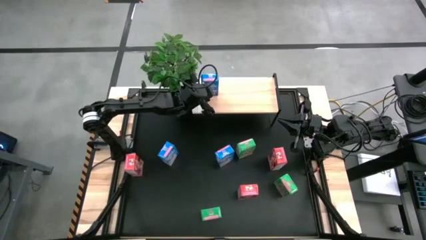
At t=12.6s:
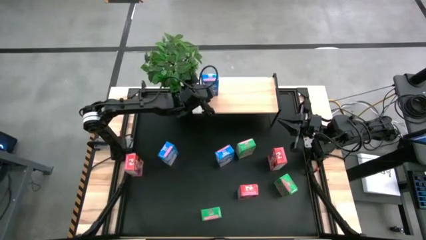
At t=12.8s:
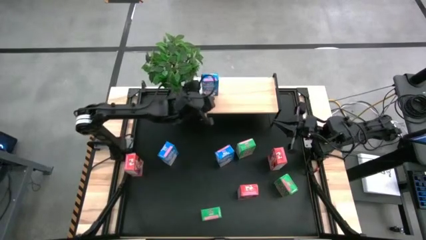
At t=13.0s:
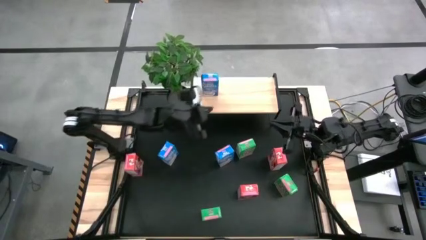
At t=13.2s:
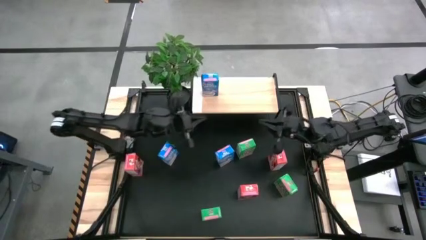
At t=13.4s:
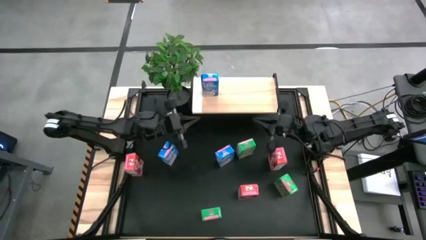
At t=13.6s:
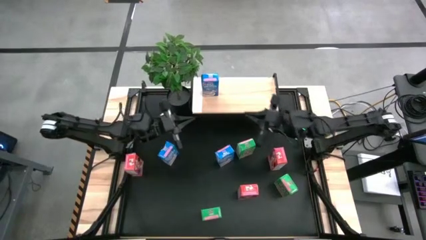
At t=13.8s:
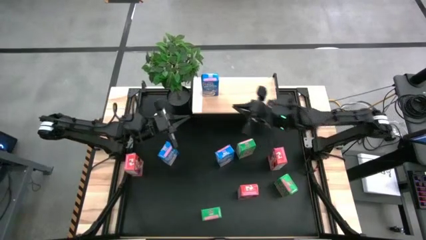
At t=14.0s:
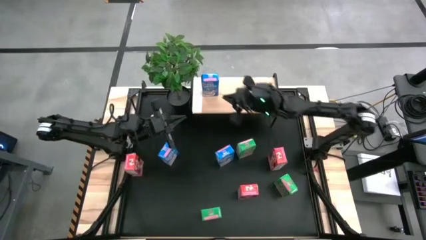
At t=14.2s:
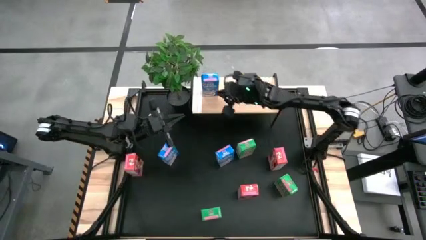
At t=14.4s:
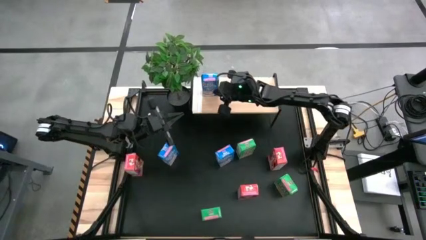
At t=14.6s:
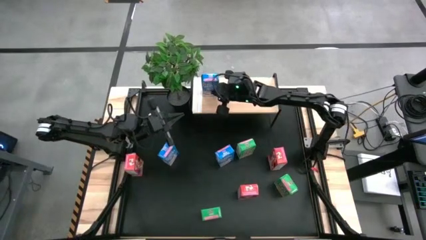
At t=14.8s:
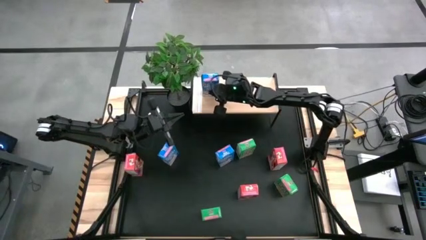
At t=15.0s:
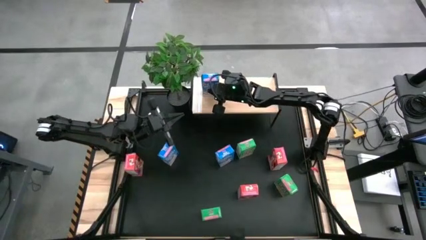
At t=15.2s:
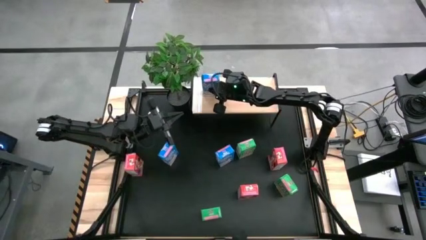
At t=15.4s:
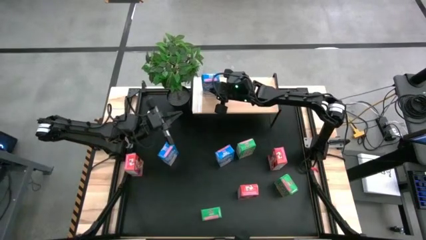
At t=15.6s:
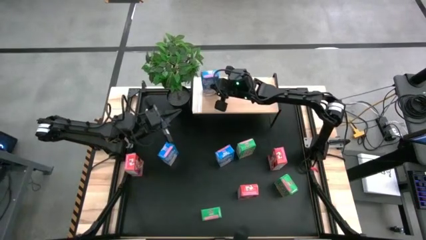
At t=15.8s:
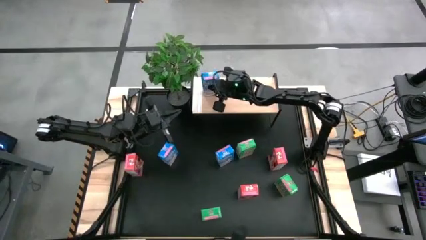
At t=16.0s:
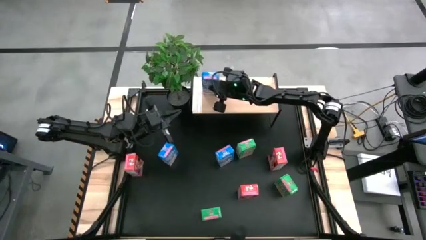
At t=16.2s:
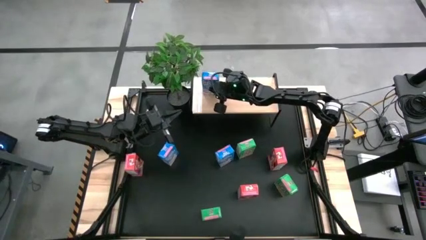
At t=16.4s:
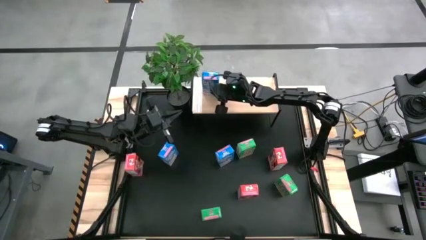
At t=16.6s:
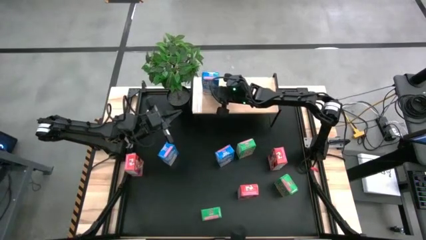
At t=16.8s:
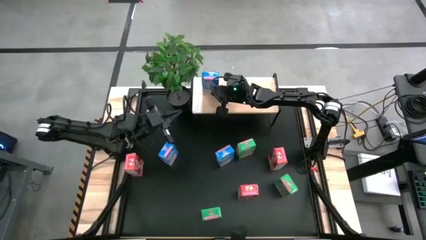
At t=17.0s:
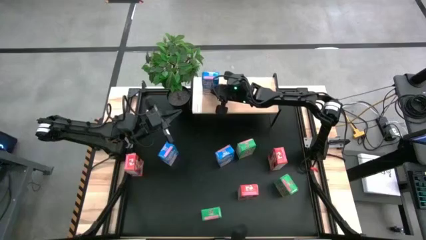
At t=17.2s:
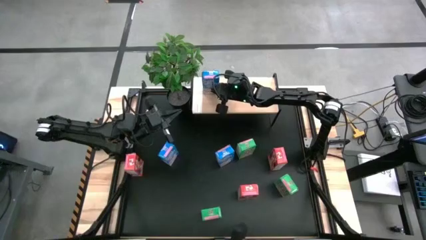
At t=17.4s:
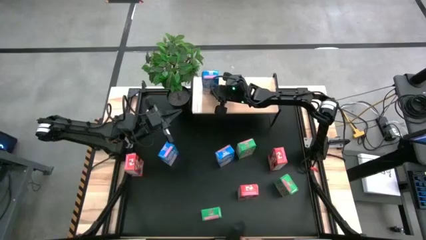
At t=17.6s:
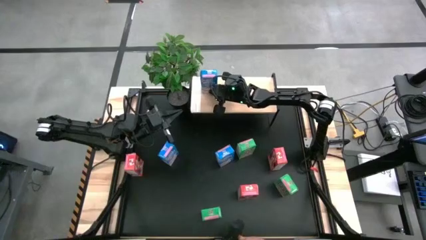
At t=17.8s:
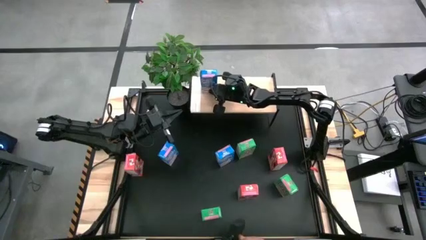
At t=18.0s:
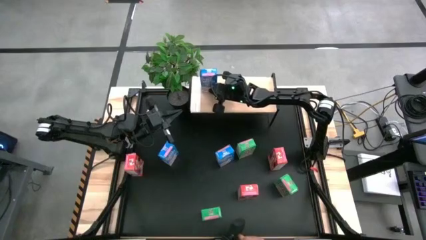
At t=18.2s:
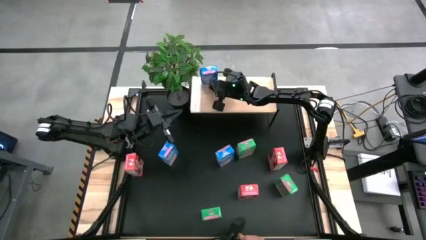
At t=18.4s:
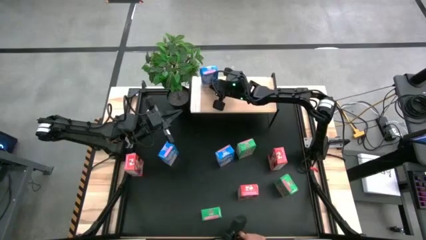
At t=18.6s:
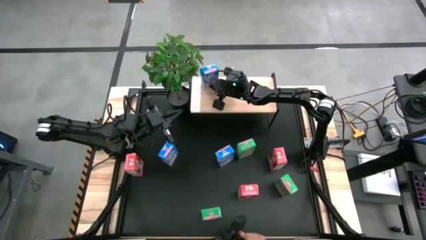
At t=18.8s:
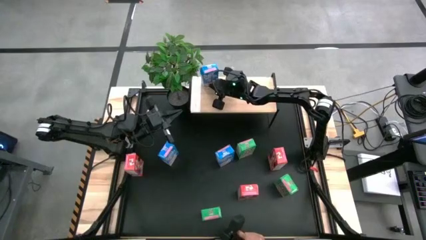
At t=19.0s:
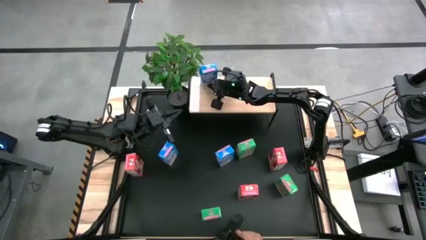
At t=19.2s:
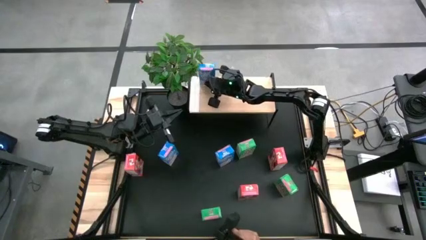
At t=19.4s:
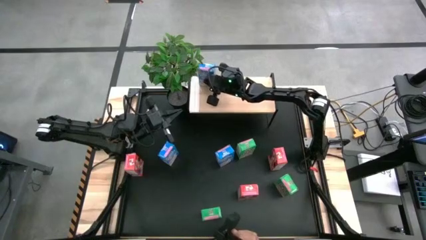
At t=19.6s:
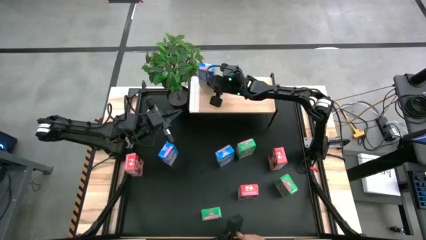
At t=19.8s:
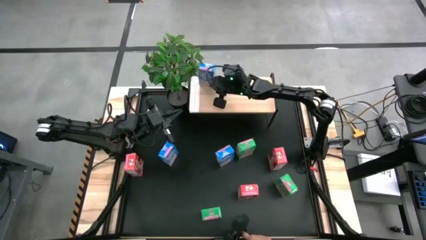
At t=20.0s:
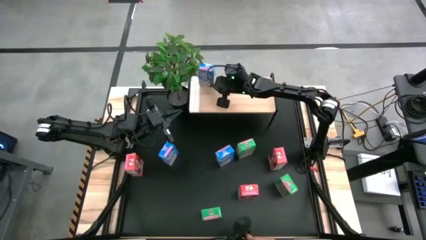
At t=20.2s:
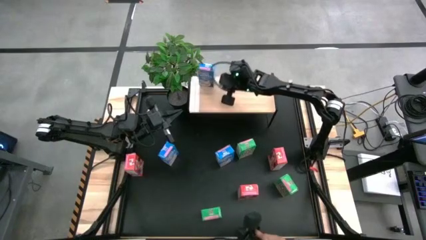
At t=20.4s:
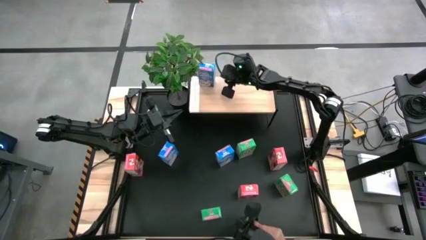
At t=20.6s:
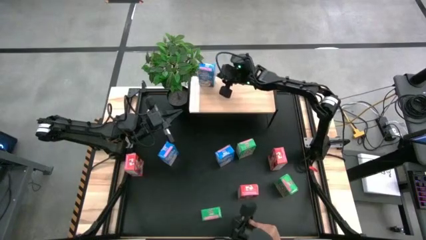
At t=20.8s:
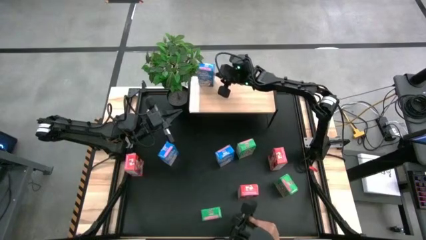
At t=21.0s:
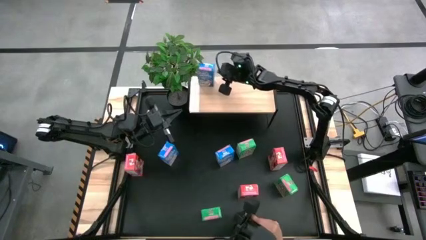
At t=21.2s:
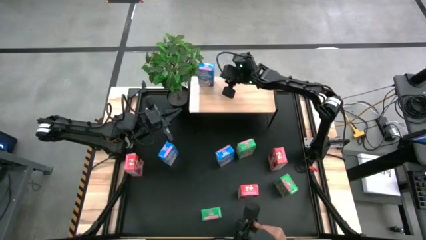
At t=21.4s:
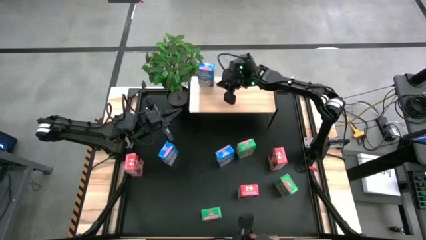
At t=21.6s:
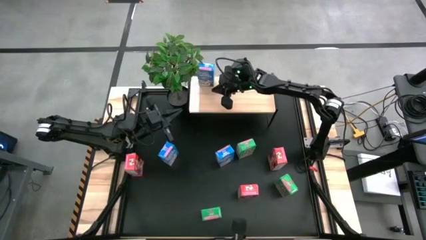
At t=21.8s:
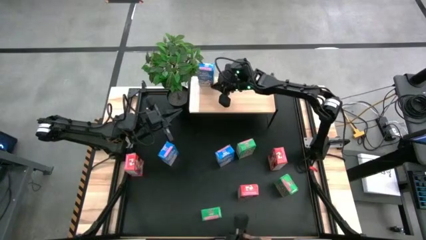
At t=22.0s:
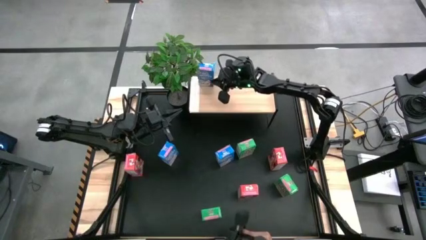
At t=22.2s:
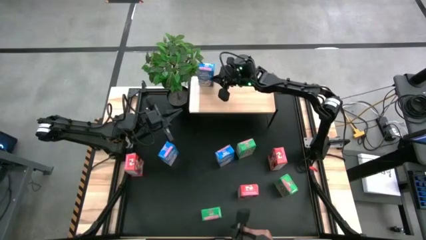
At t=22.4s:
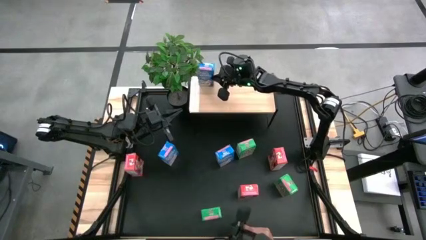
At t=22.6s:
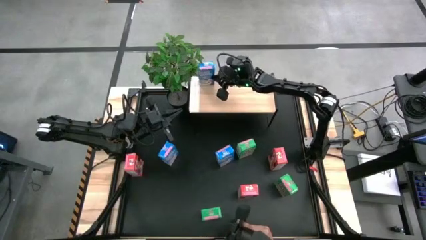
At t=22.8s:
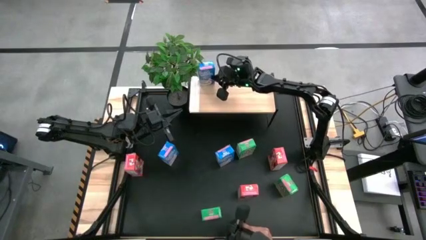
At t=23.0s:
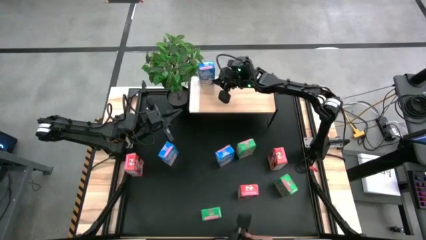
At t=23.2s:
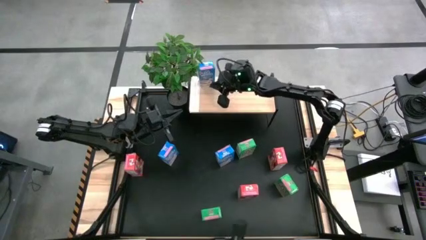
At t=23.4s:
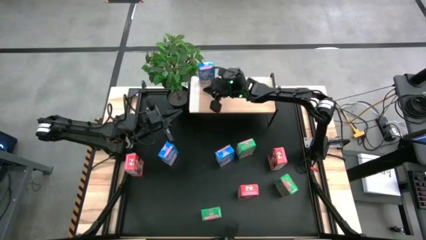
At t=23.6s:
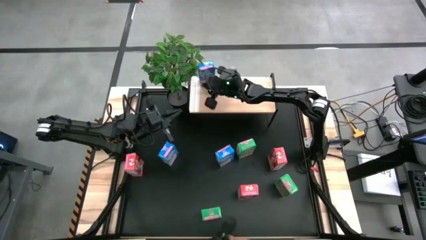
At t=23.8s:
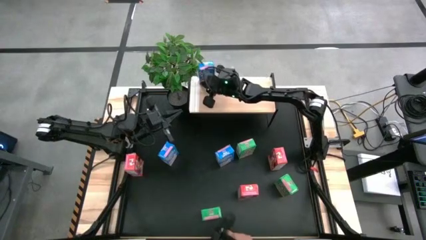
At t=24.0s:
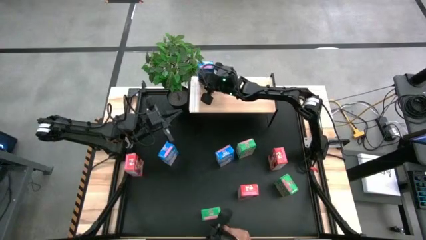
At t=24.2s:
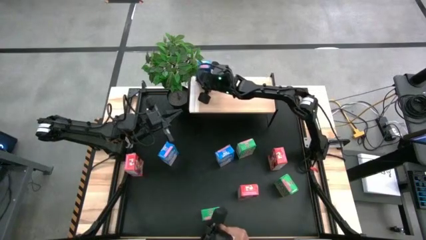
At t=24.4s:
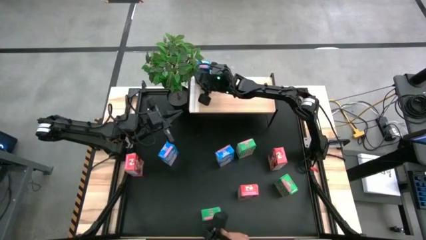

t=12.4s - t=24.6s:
Task: Stack cereal on shelf
Put the bottom left blue cereal box on the shelf

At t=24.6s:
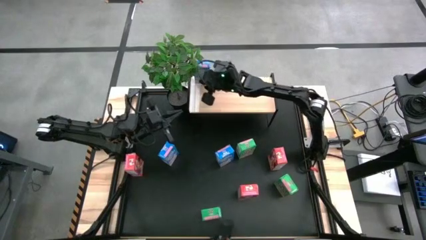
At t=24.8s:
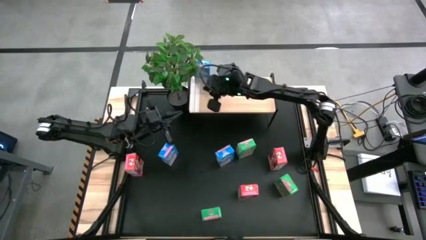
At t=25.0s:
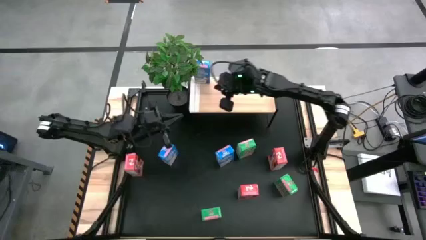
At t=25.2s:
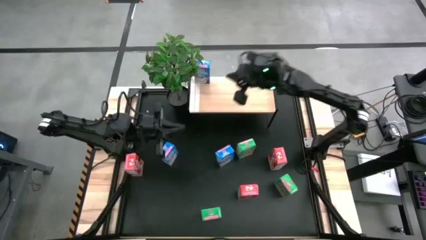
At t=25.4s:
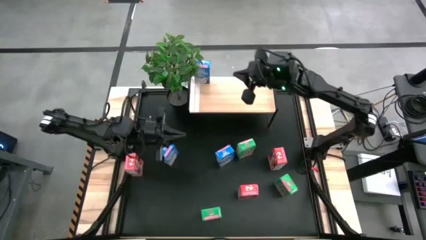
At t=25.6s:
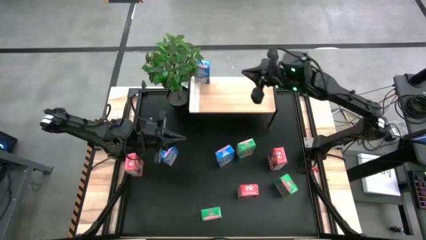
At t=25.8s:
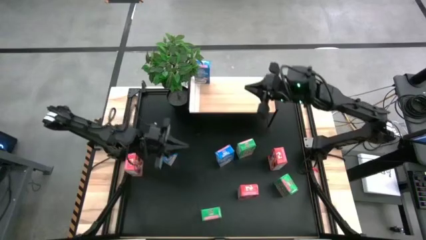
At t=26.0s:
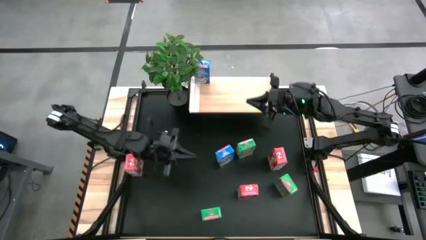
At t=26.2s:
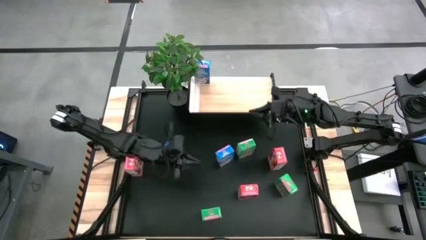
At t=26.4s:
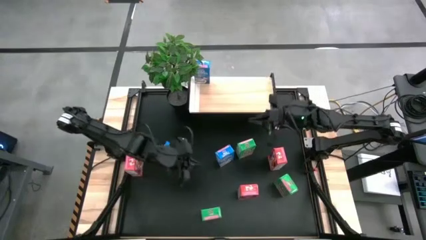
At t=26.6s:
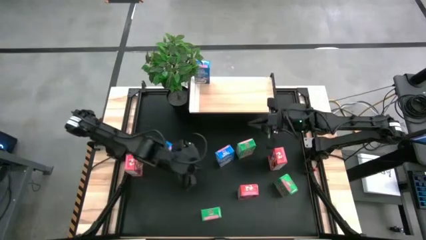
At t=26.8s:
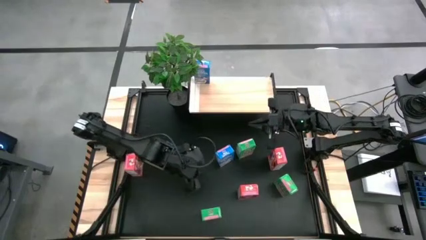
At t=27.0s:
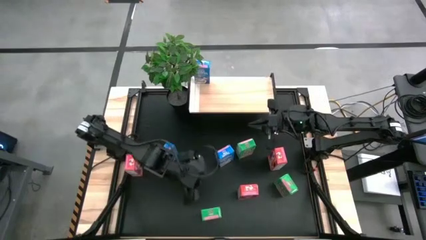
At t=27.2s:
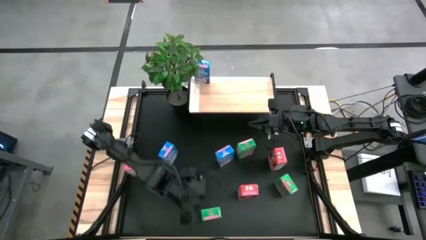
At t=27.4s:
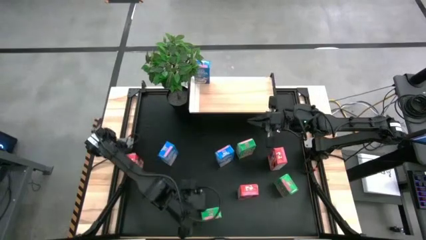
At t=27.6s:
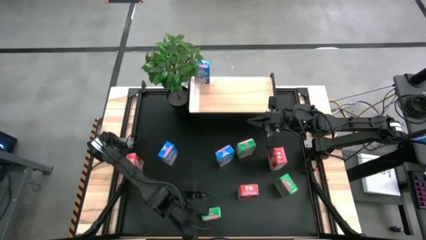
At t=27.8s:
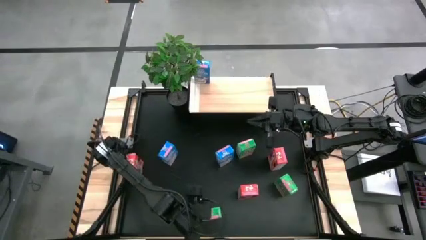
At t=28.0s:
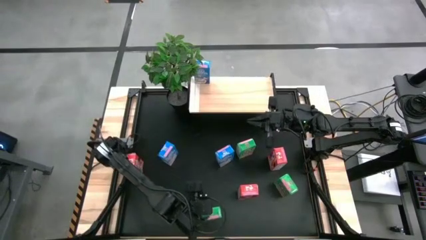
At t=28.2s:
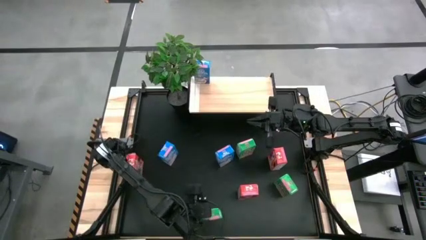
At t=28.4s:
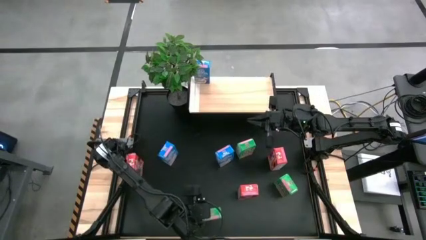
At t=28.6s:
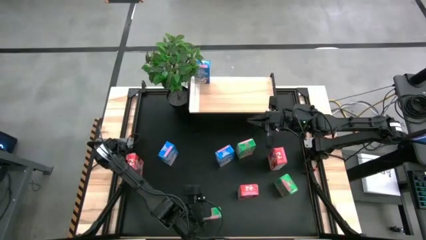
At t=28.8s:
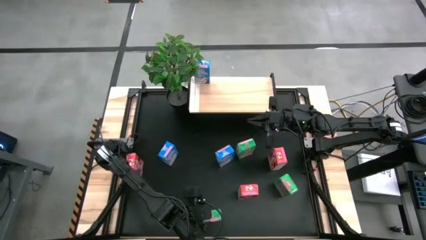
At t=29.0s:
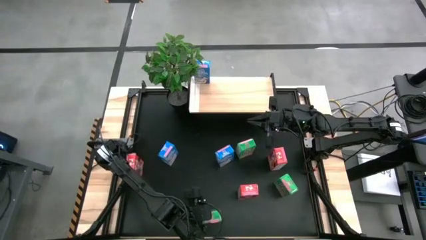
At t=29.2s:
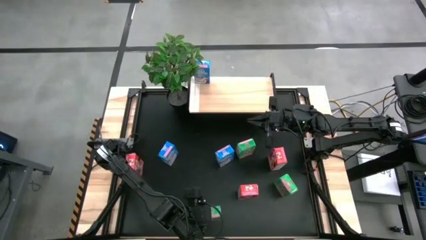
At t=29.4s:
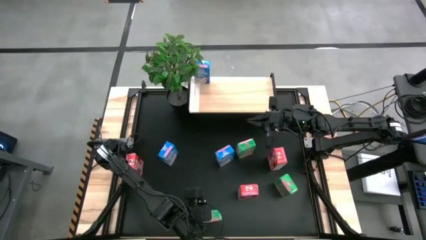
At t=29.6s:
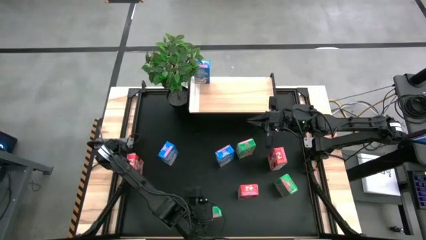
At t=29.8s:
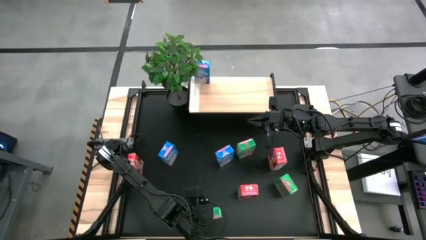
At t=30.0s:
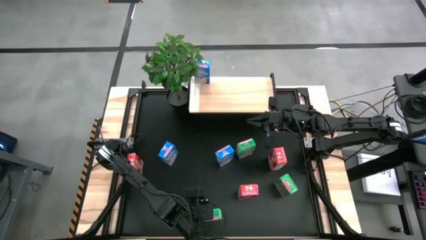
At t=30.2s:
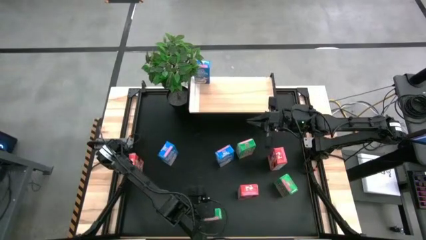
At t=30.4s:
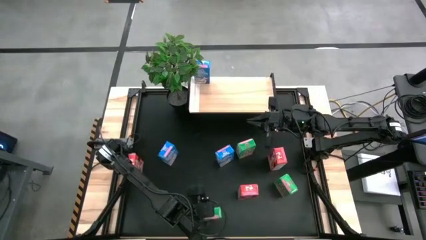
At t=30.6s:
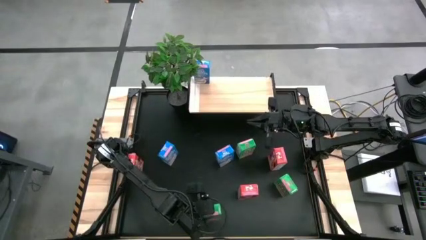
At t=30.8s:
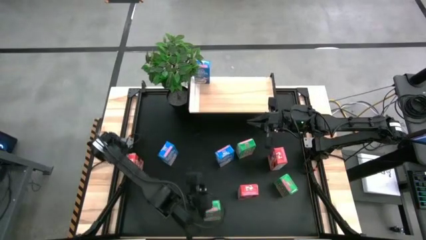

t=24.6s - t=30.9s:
Put the bottom green cereal box on the shelf
